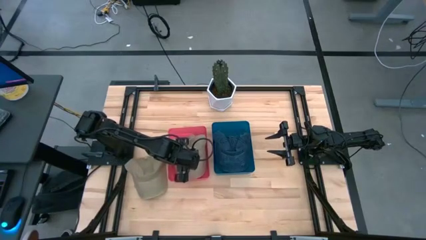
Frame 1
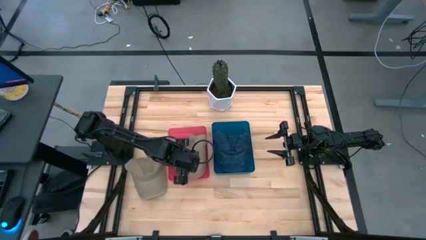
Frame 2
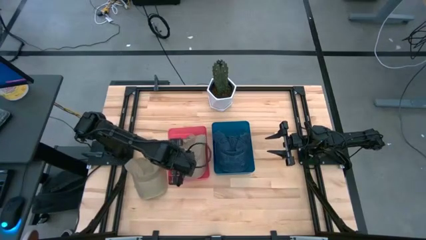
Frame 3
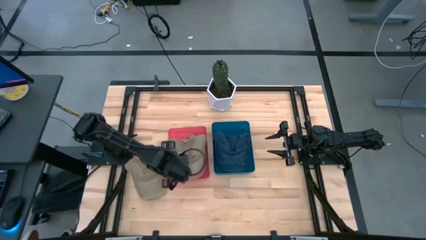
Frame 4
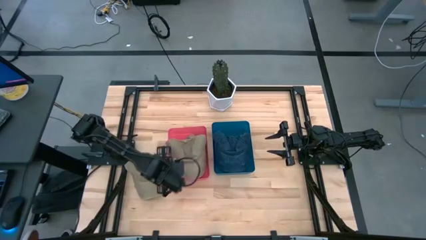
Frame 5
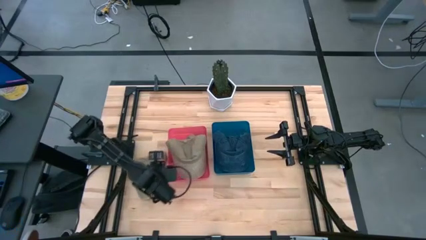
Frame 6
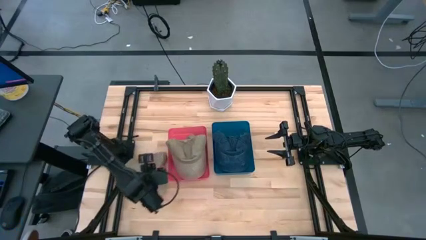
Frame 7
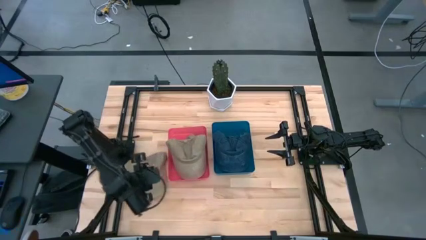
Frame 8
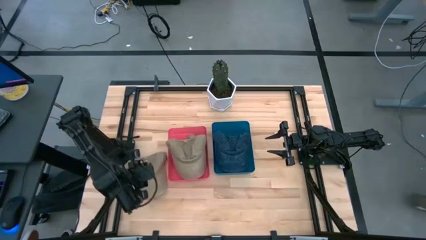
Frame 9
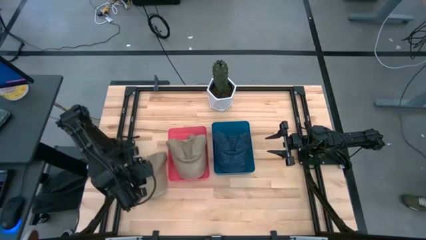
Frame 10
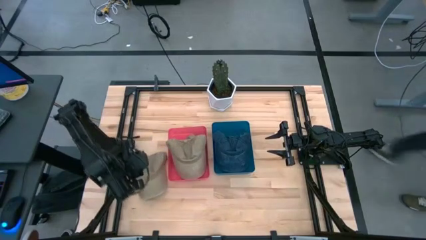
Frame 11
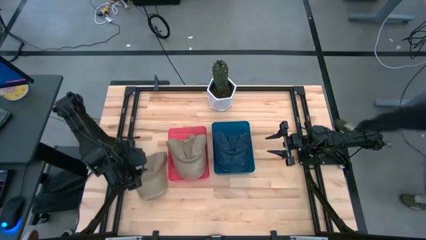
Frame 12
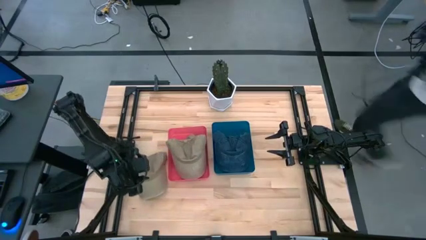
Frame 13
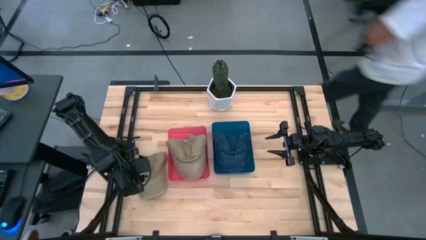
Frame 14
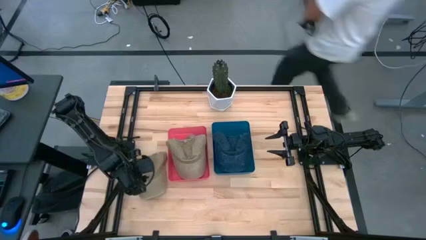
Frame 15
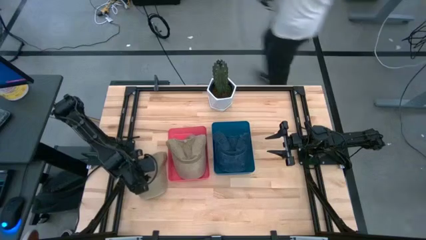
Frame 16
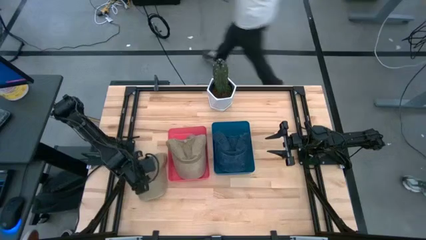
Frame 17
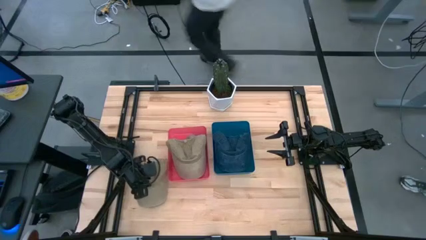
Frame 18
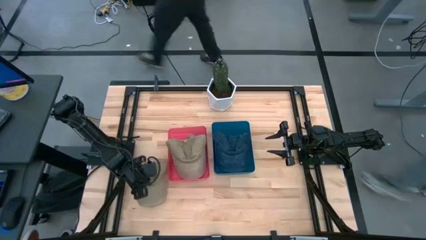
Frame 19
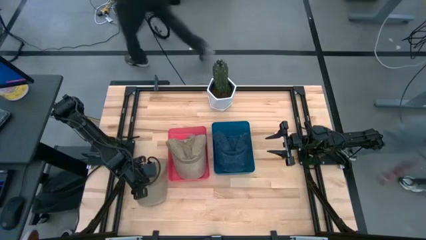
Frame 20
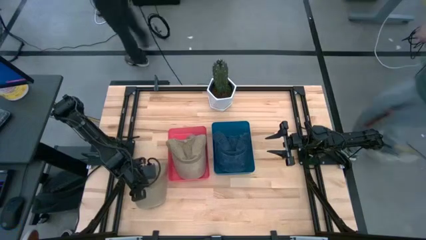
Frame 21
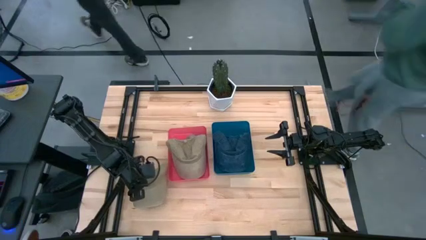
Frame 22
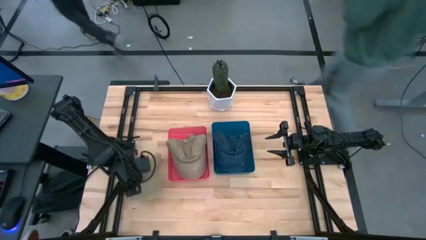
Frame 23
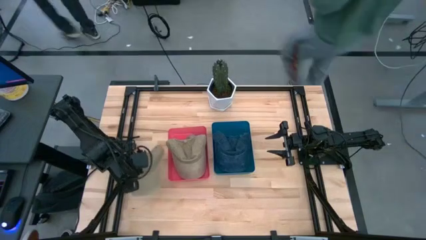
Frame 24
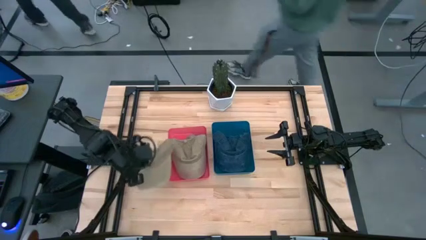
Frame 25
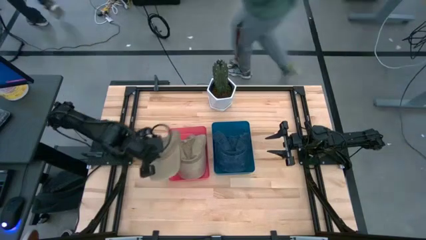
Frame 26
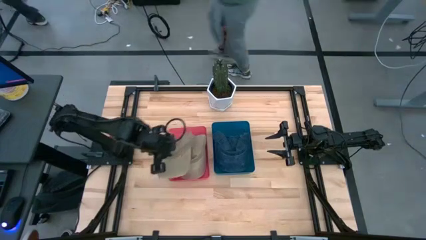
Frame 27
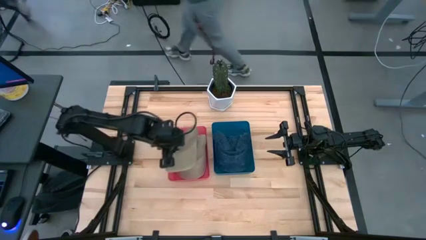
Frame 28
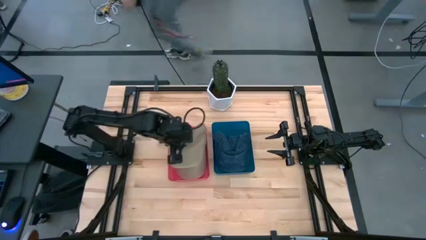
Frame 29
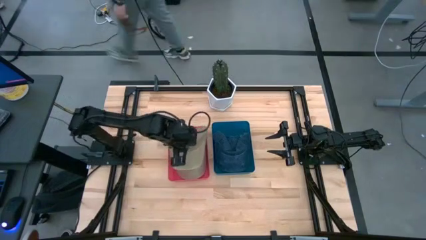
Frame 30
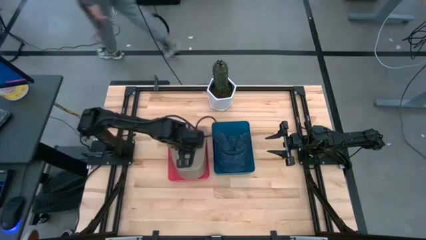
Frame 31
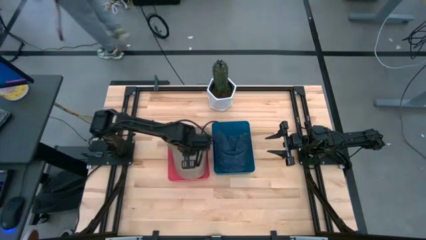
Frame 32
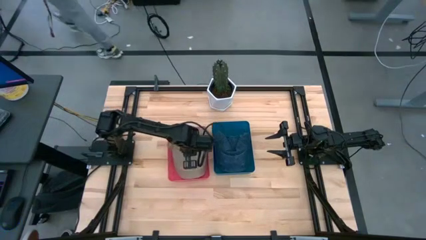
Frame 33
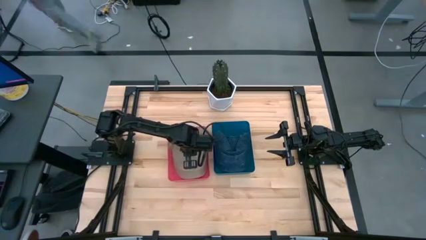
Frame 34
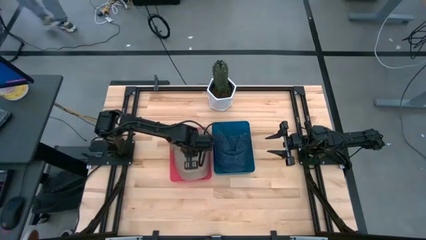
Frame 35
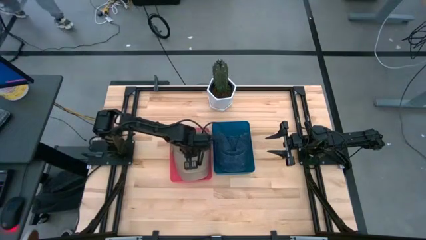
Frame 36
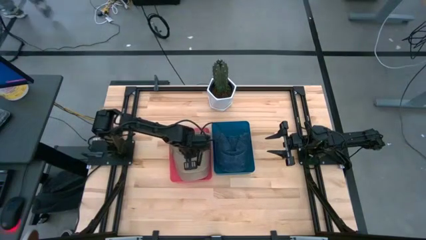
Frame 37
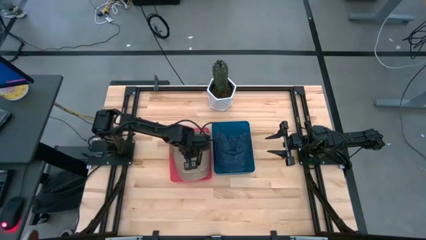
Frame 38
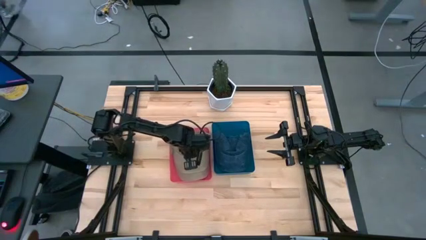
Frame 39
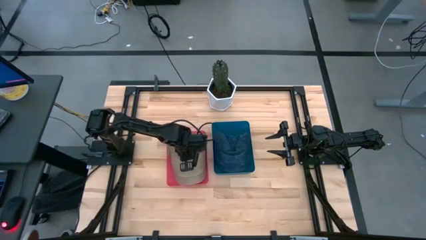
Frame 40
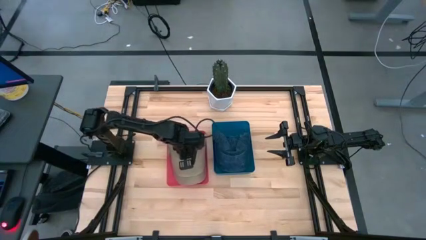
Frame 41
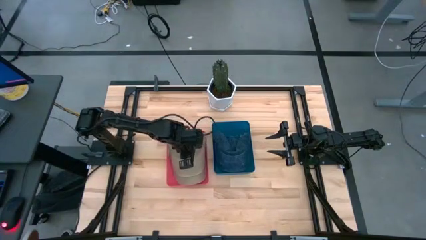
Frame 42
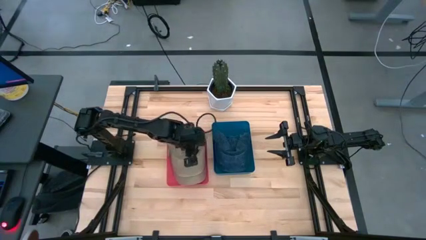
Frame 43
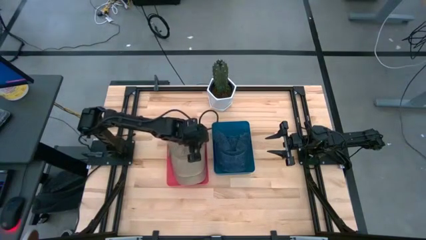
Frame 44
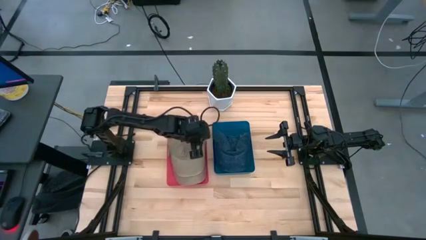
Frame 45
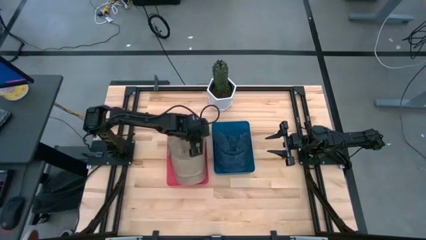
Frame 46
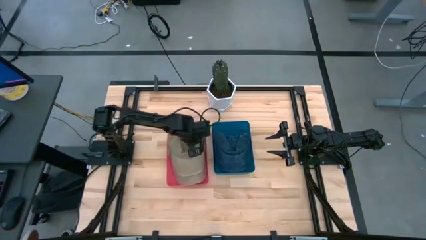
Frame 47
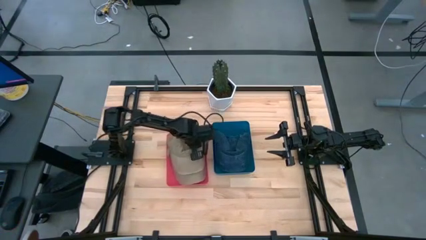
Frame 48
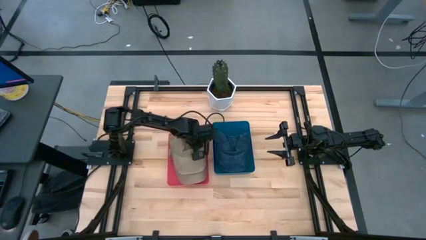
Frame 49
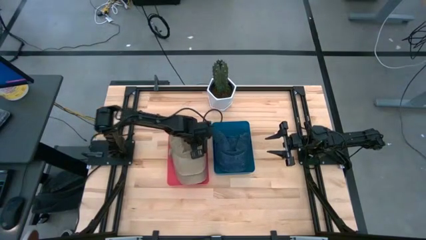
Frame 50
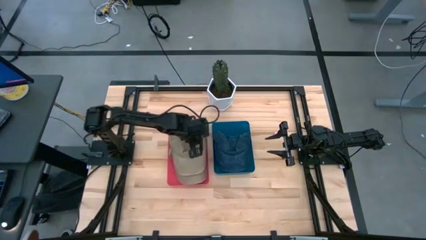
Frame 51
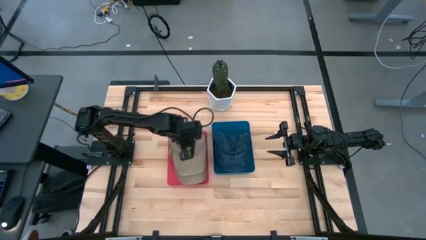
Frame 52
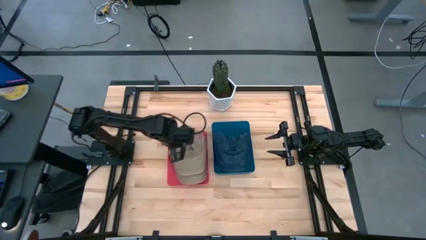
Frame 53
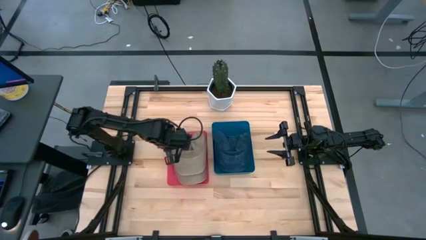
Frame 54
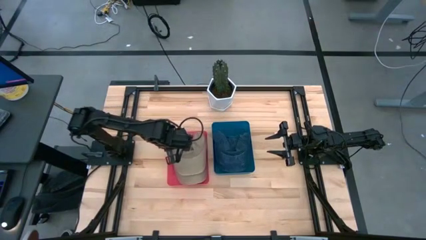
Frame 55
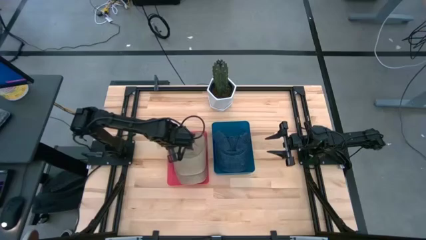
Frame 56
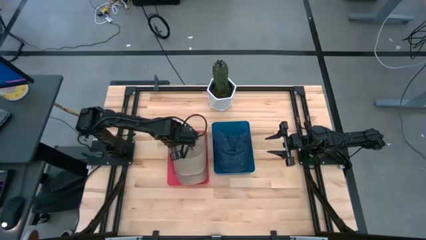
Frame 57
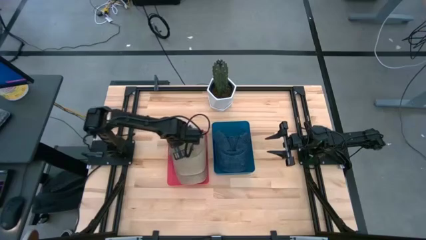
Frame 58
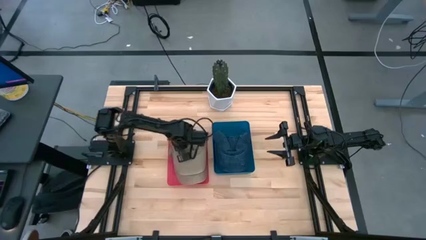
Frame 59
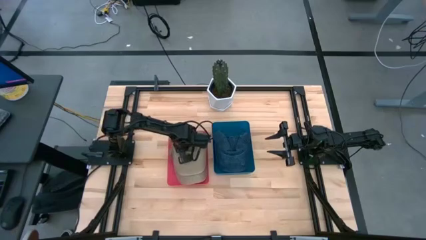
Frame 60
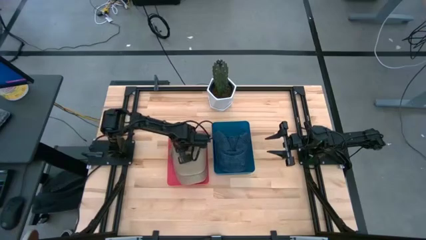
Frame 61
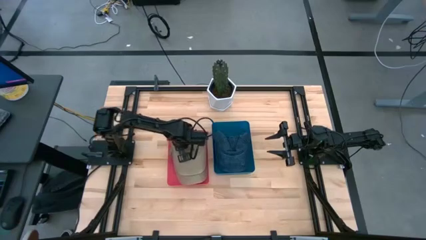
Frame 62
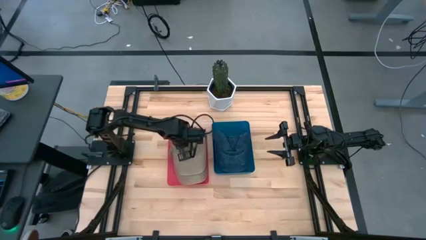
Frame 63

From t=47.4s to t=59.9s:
Task: Pick & Place hat
Put the brown cap into the red bin

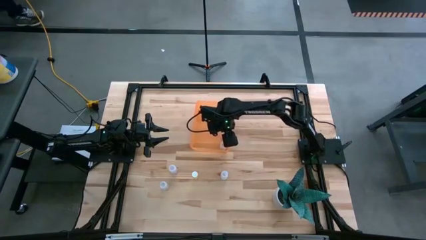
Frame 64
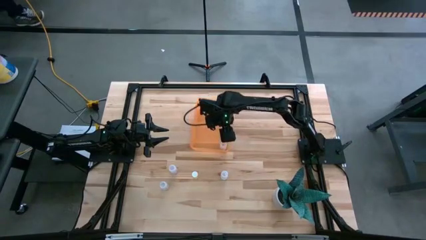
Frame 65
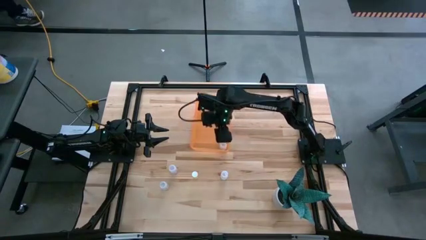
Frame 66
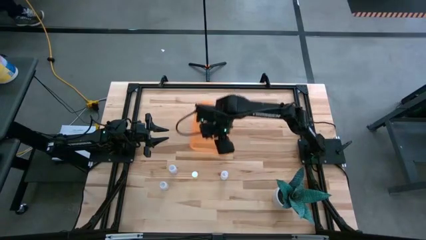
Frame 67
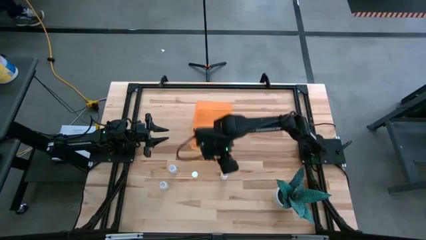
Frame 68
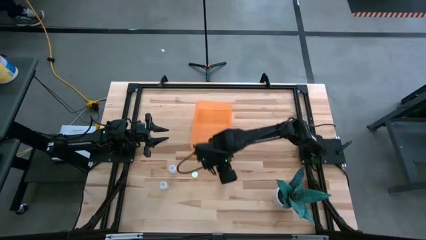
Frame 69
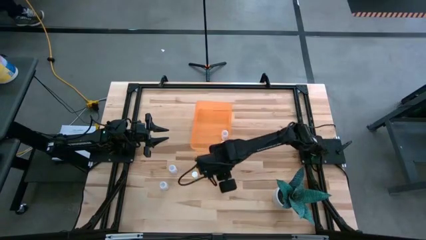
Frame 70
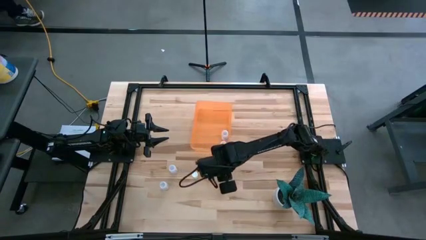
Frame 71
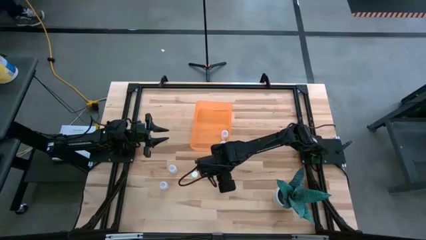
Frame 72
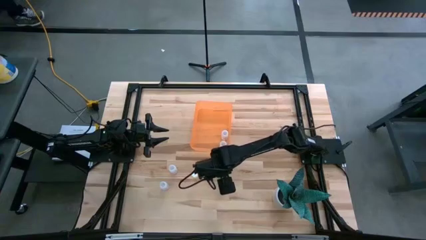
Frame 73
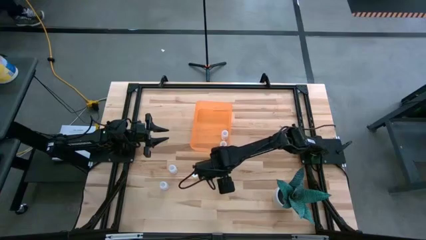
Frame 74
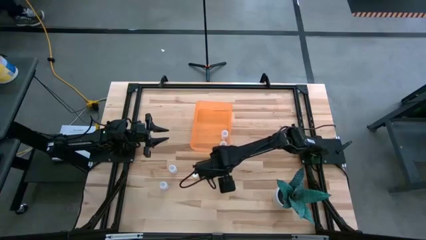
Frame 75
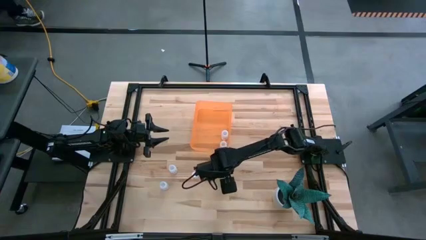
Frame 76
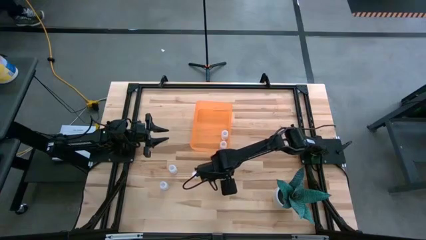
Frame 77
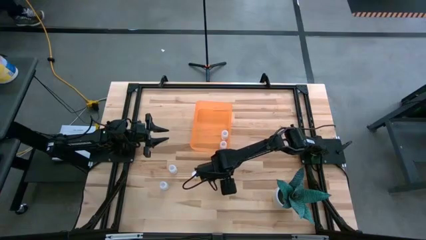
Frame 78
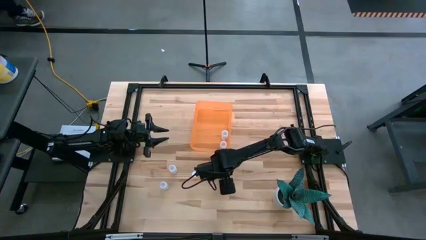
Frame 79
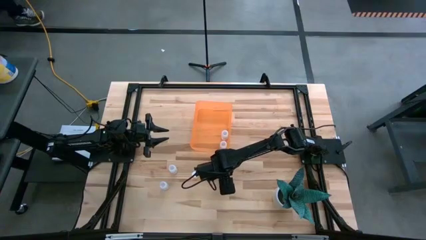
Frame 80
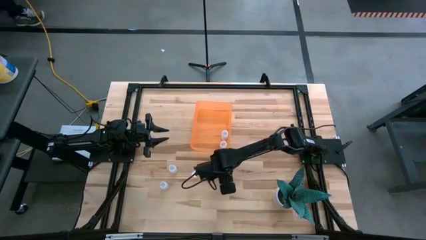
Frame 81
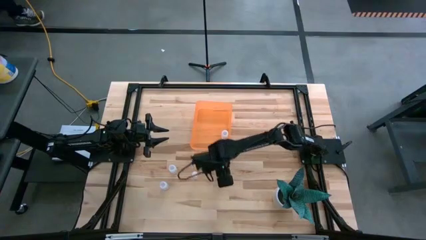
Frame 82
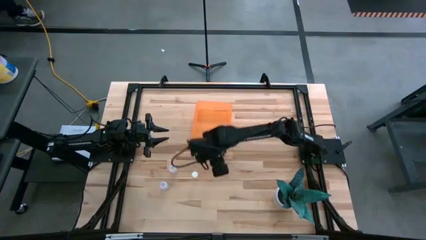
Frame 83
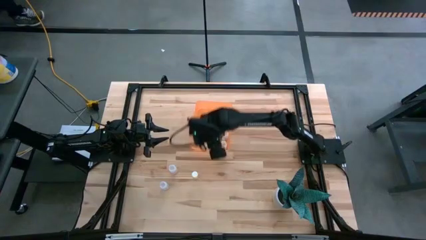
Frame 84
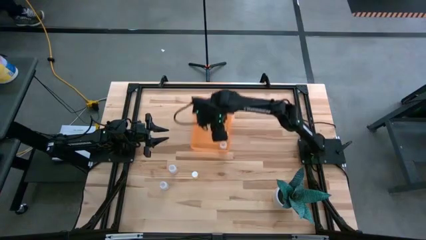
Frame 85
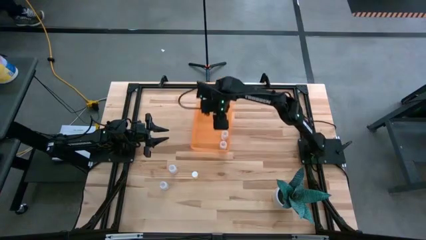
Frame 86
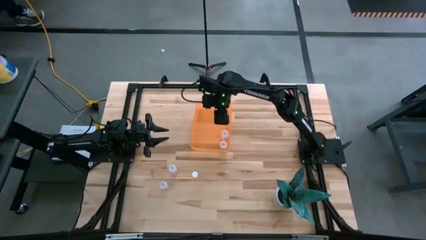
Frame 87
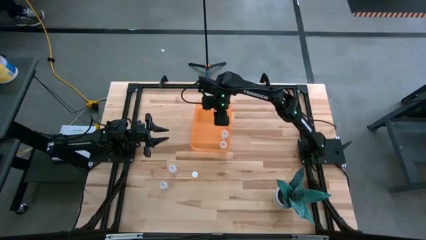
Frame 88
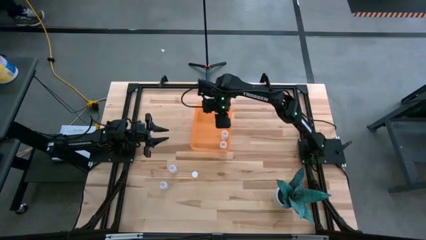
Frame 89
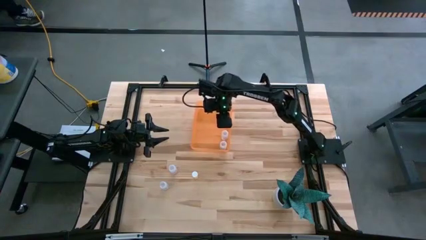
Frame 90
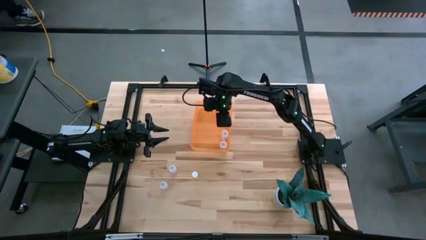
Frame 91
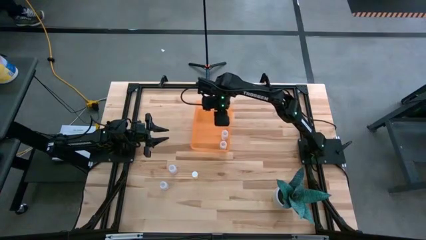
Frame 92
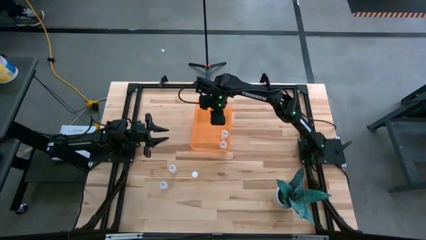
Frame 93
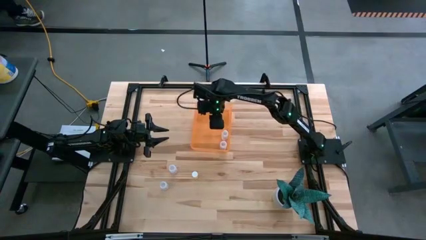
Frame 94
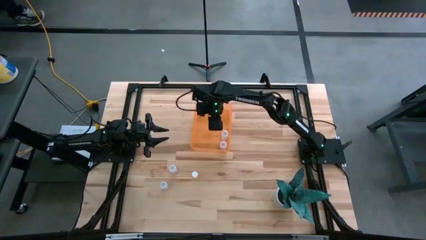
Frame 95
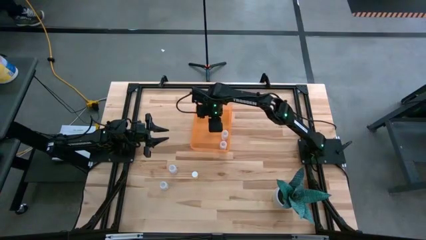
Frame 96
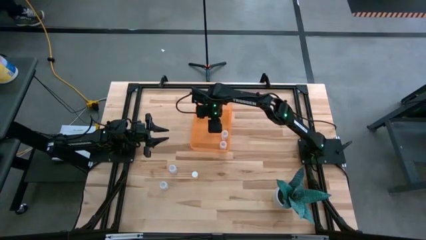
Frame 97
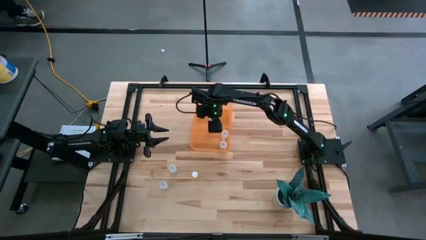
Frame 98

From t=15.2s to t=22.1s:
Task: Pick and place pill bottles into a basket
Put the white medicine bottle into the yellow bin
